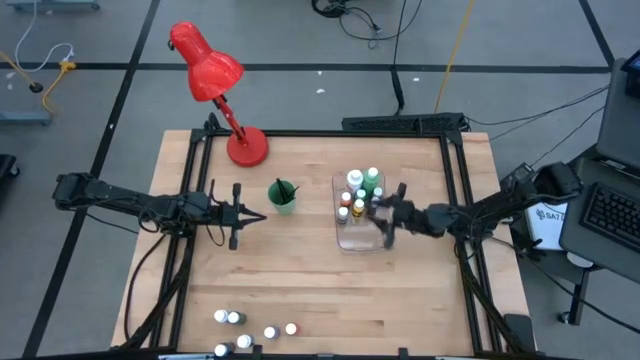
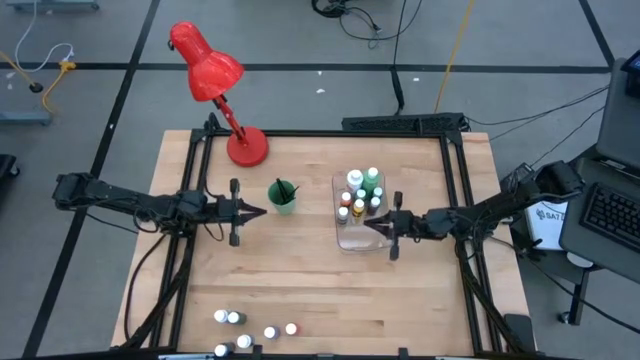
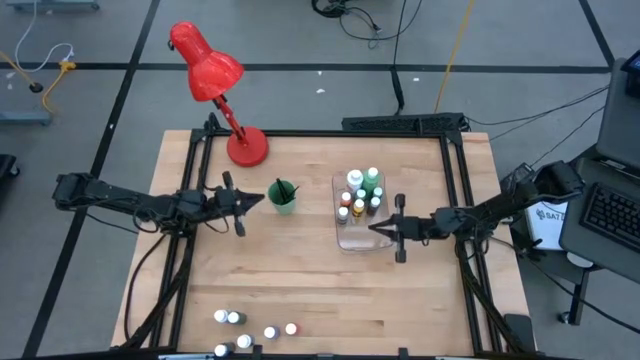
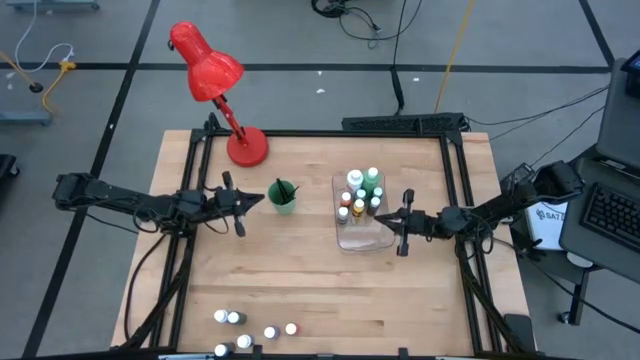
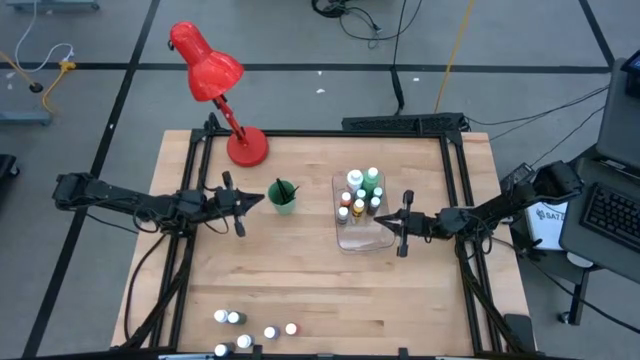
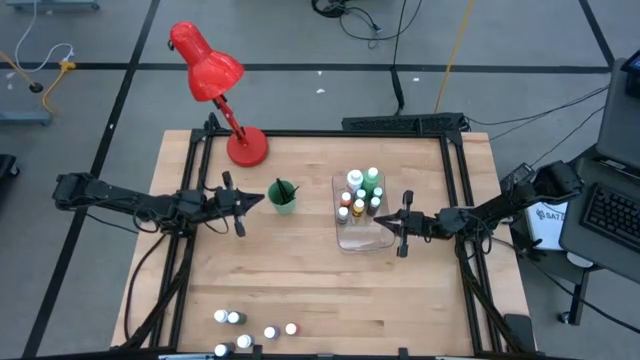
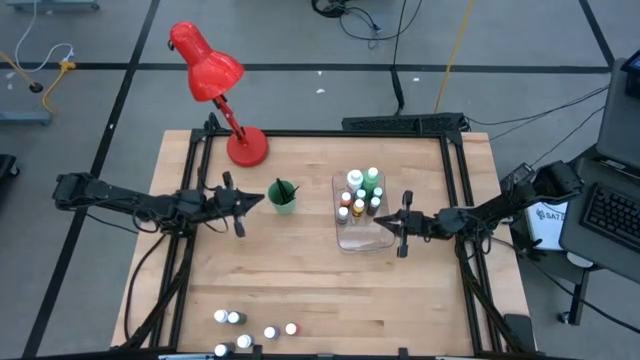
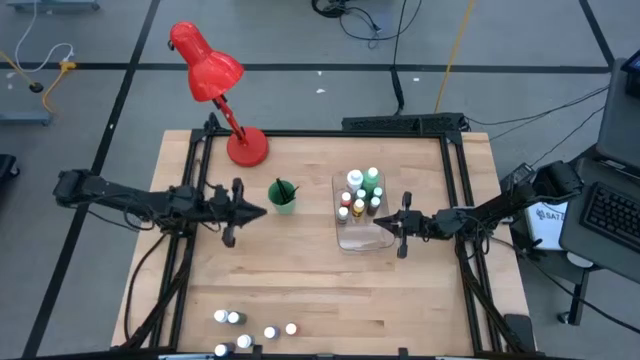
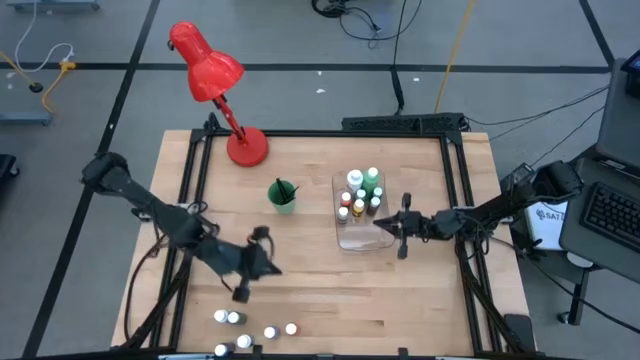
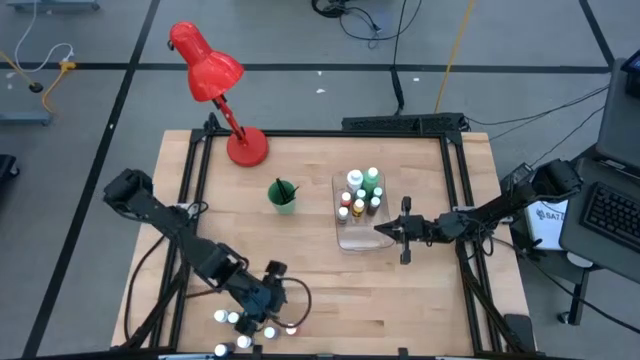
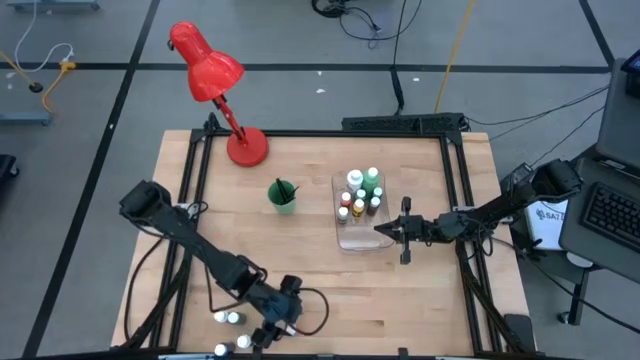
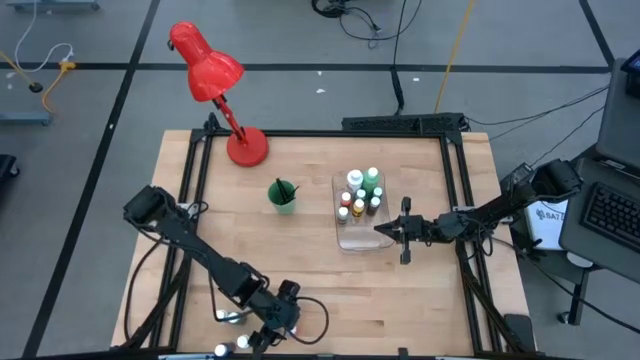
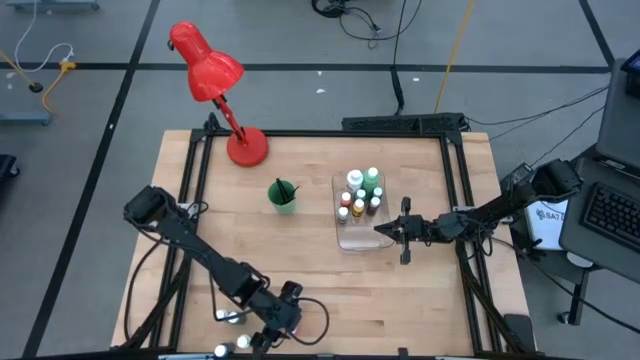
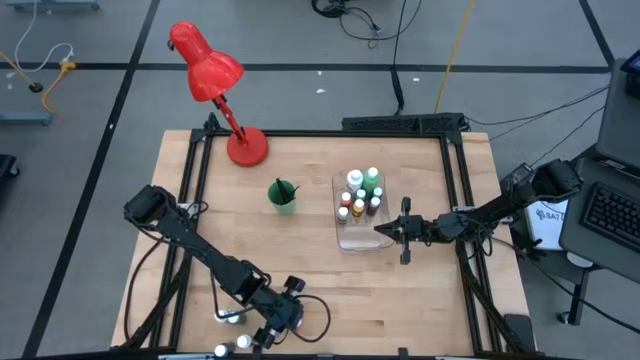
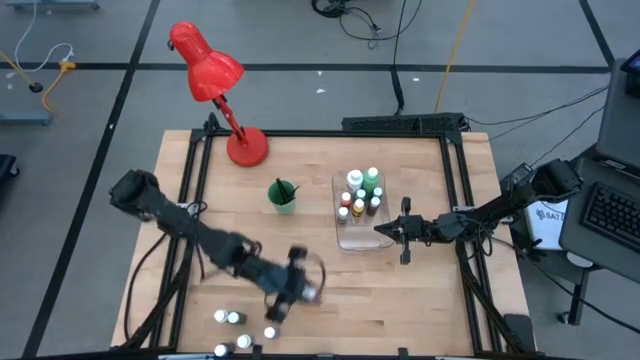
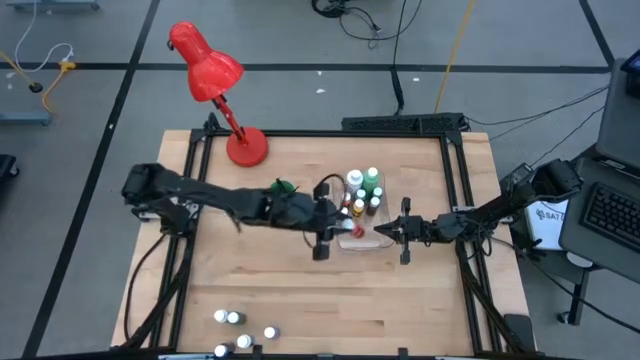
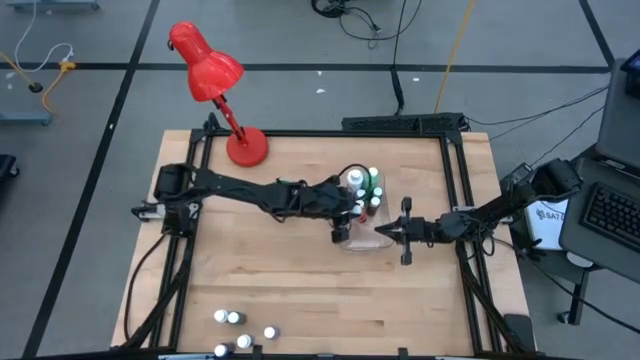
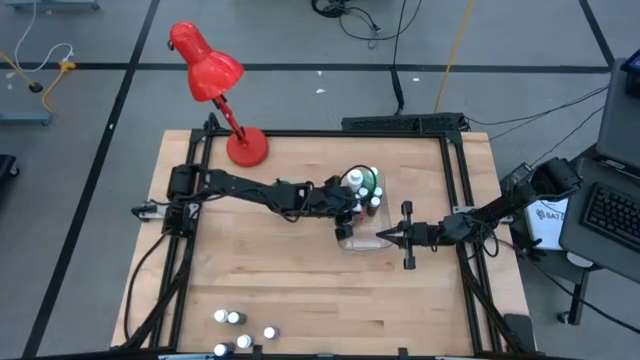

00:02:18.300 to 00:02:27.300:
Task: Pick & Place Paint Supplies
Put the small red paint bottle into the transparent bin

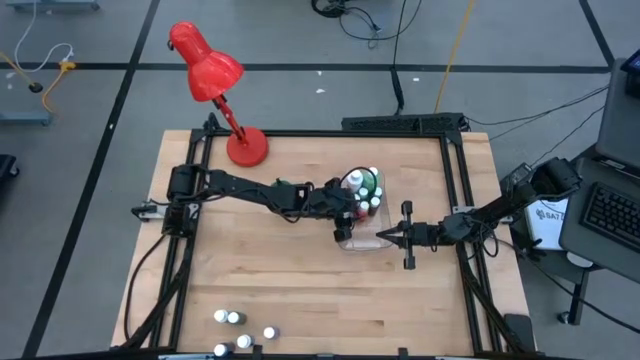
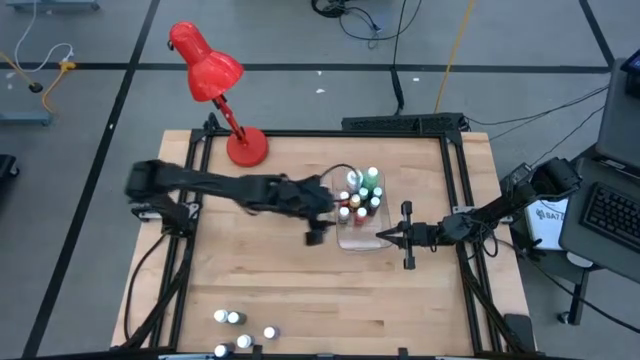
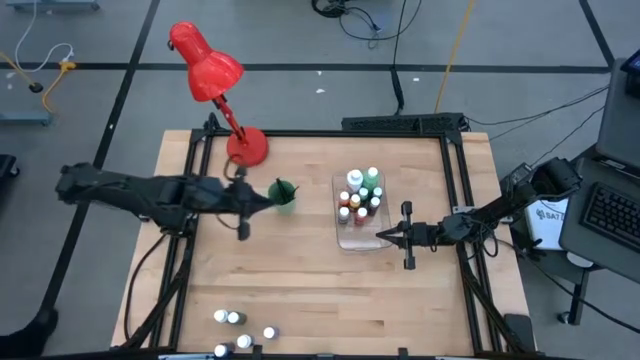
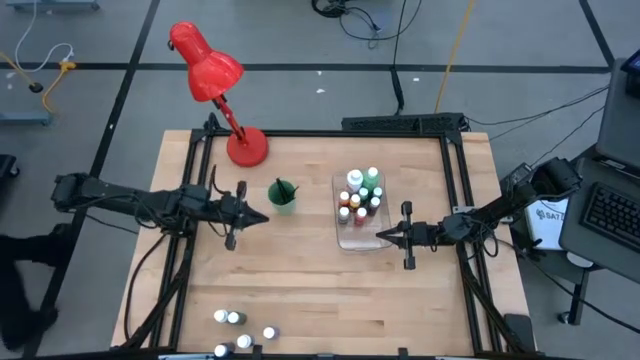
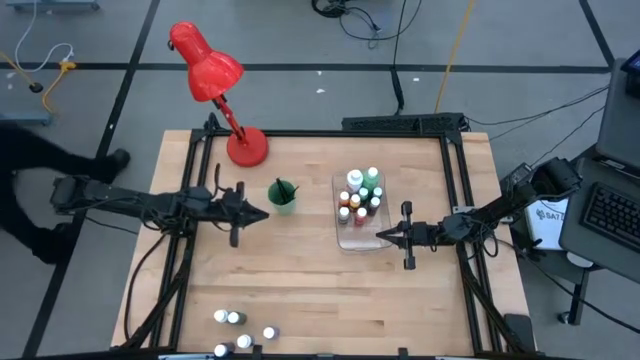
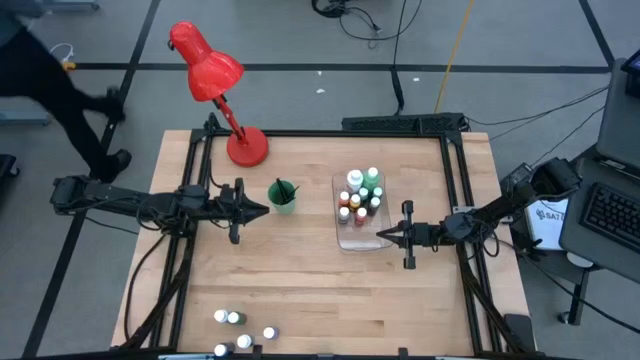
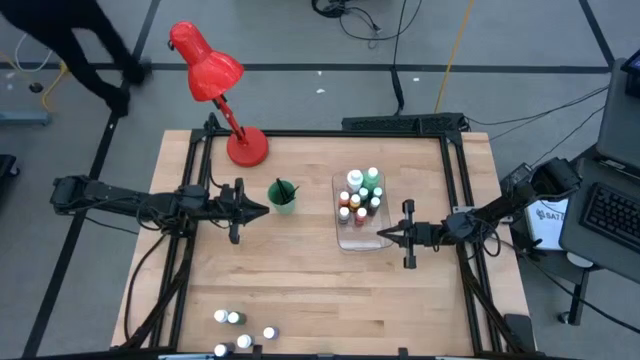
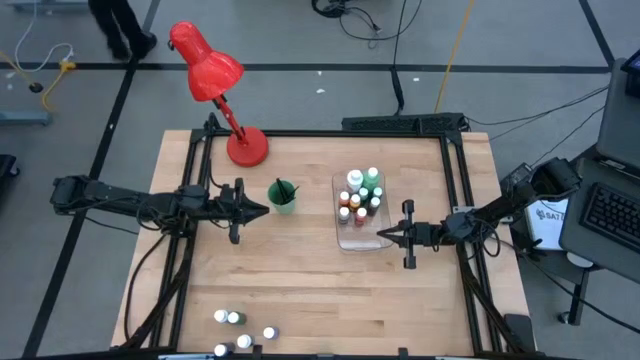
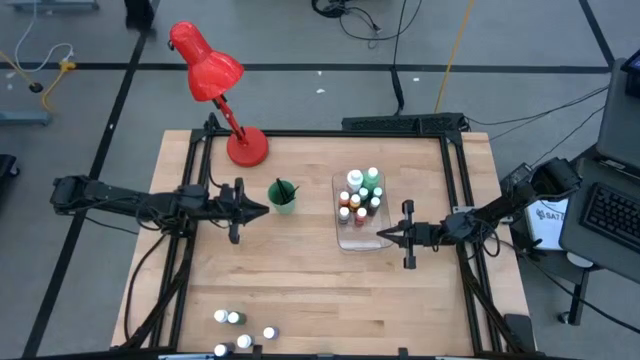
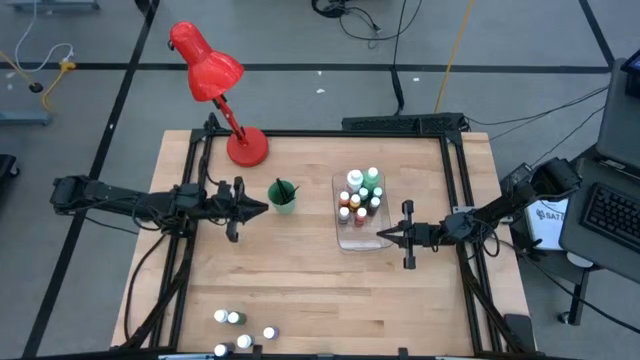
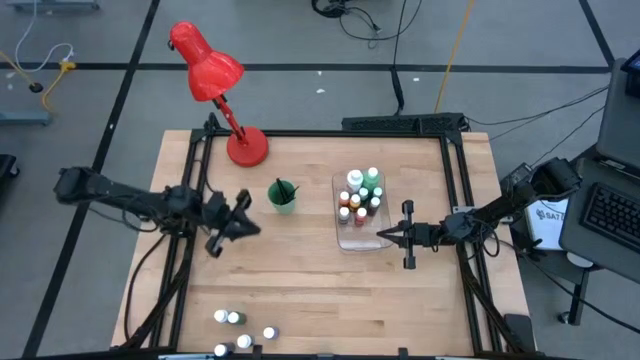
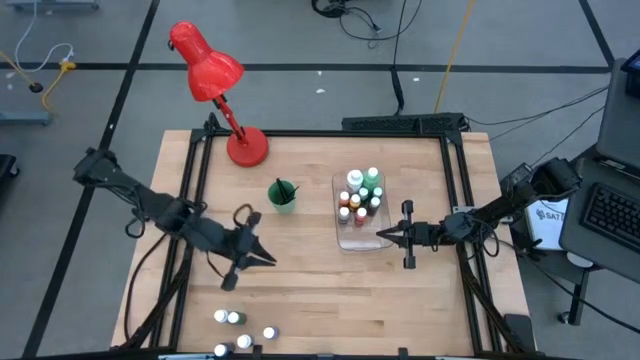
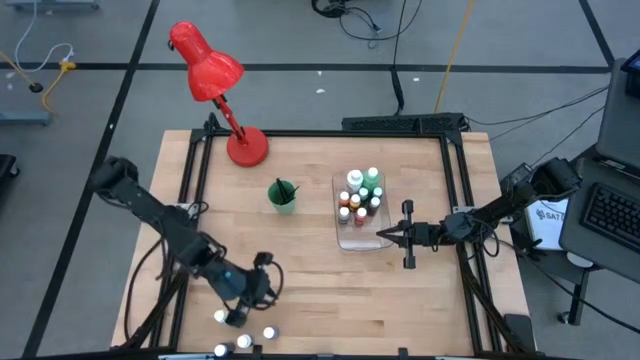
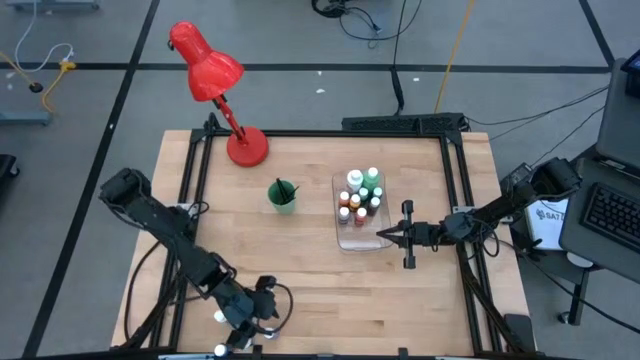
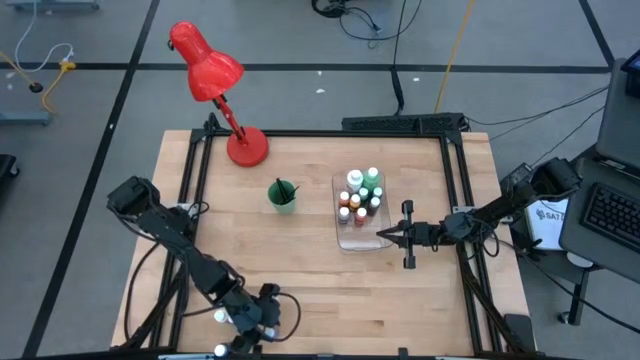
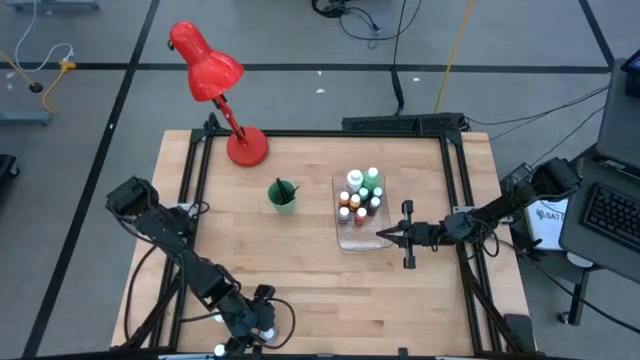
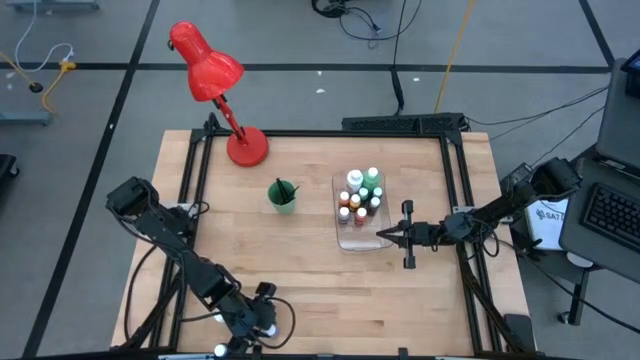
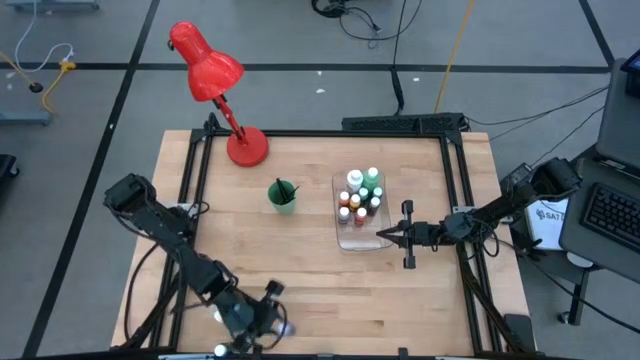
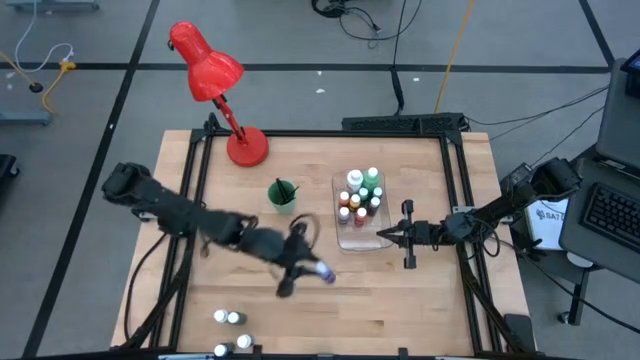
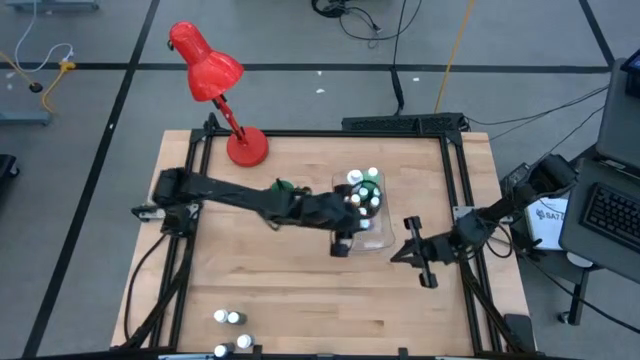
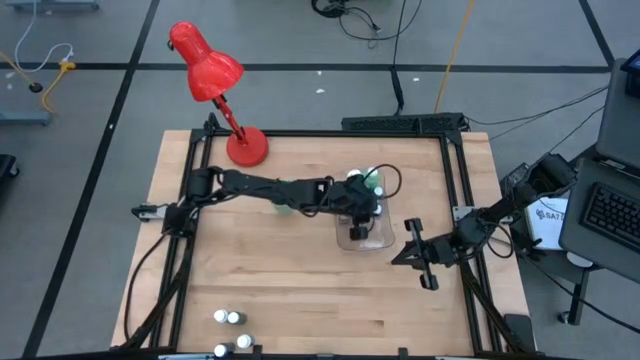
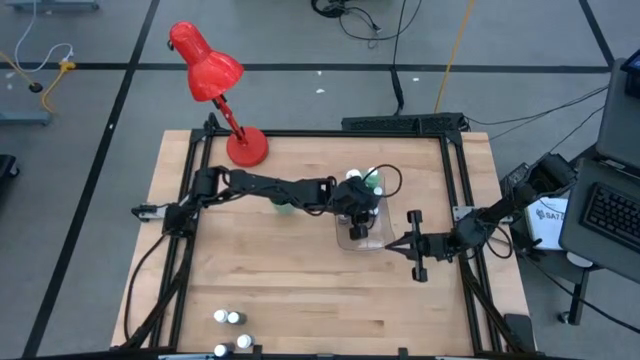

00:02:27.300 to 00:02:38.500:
Put the small purple paint bottle into the transparent bin

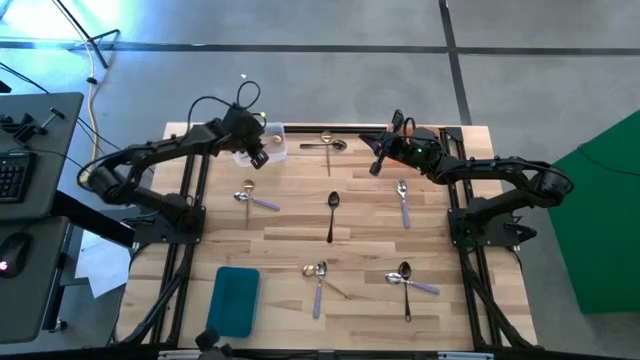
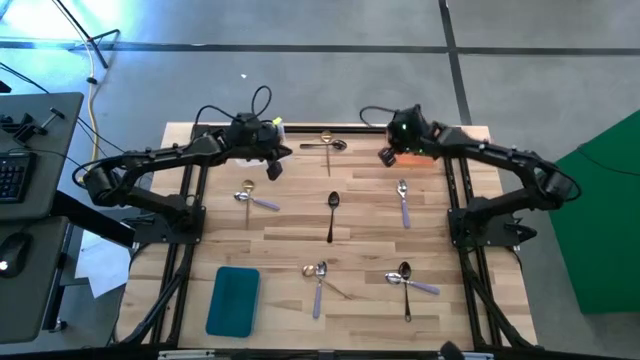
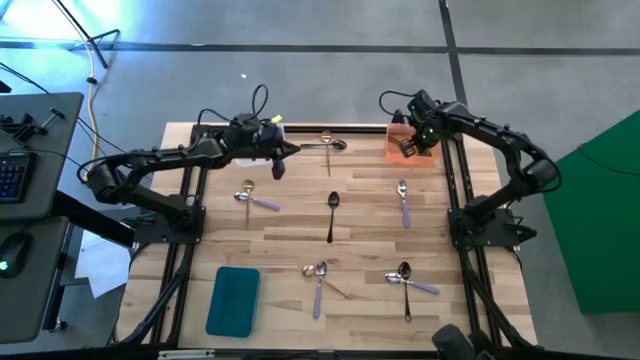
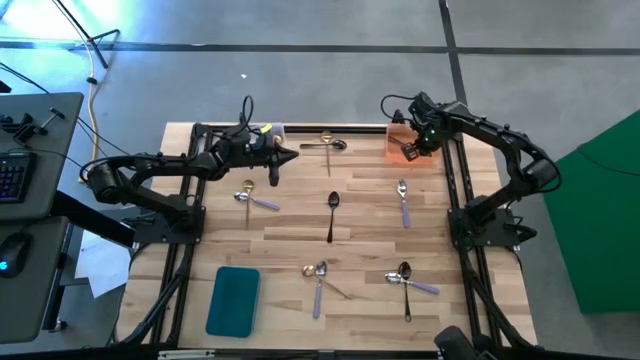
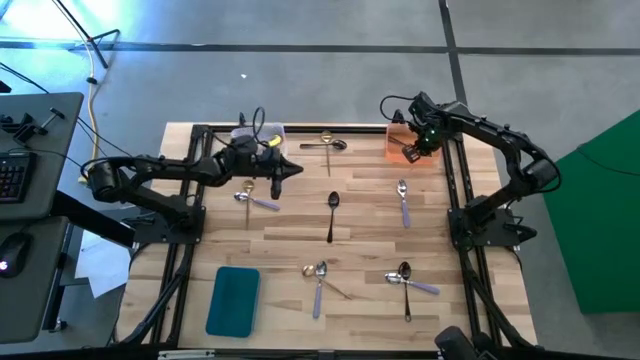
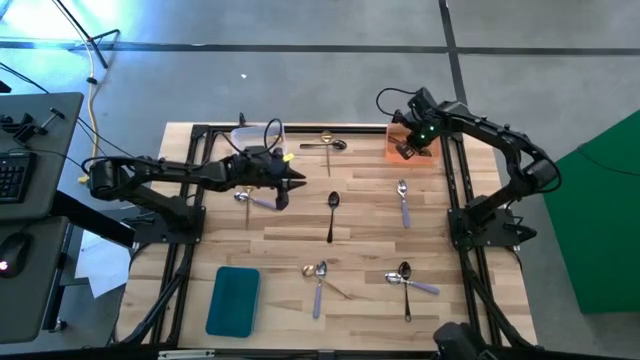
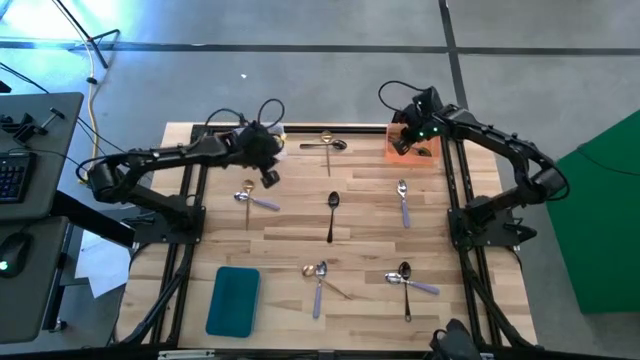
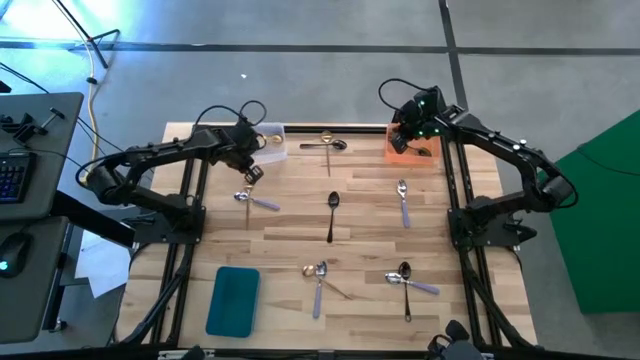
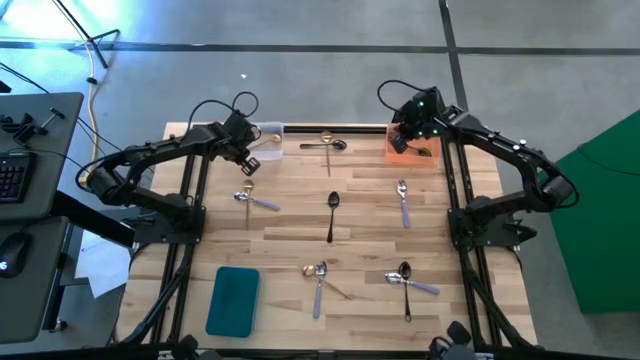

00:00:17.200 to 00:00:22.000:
Task: Sort silverware by color (type)
Adjust the transparent bin
